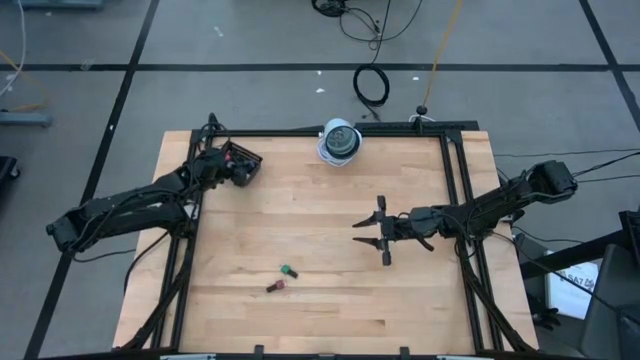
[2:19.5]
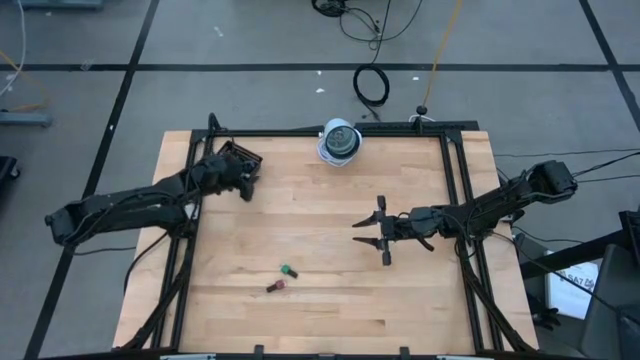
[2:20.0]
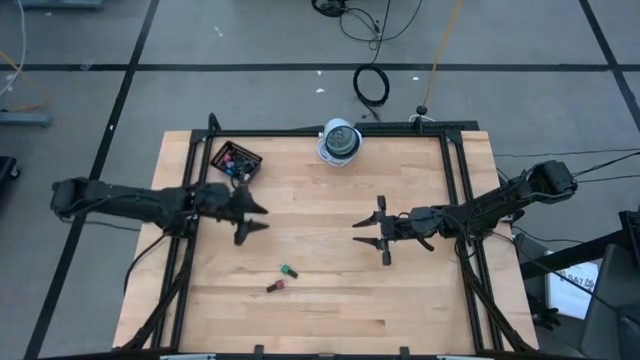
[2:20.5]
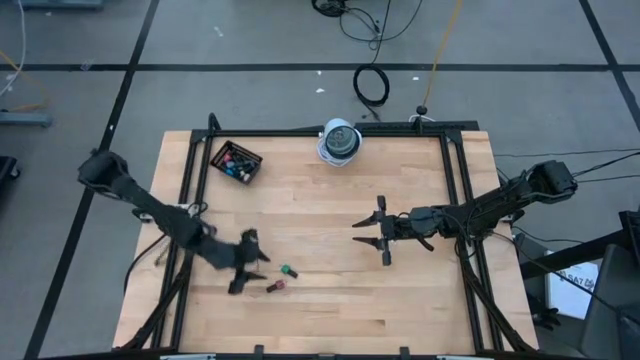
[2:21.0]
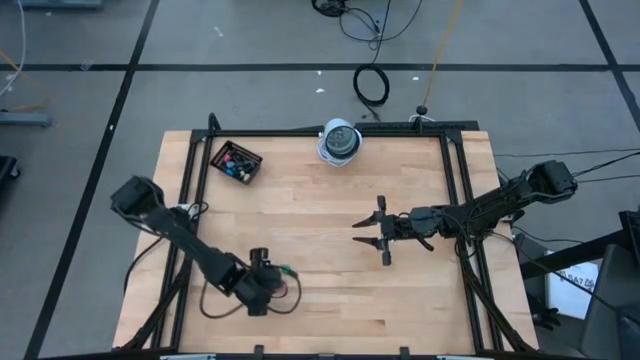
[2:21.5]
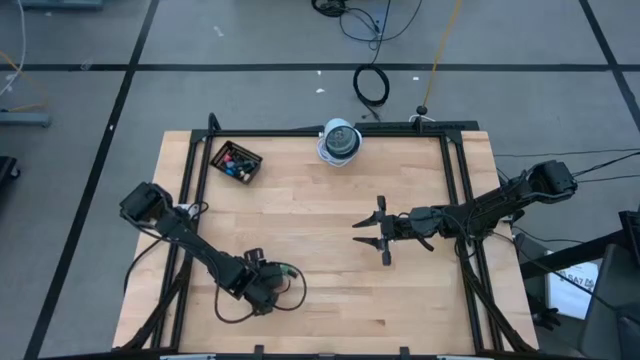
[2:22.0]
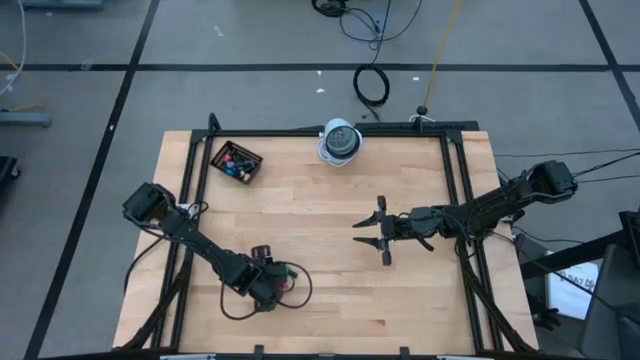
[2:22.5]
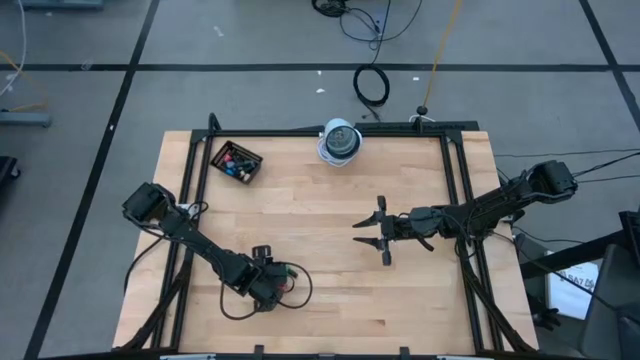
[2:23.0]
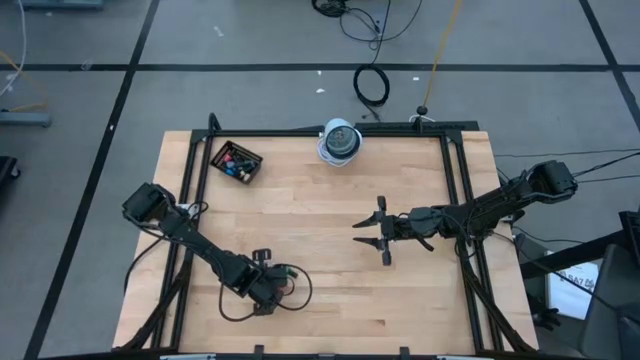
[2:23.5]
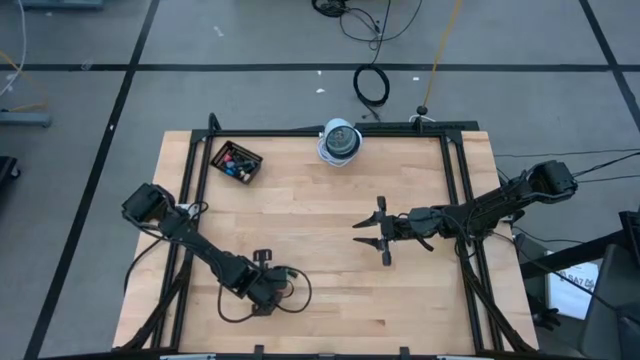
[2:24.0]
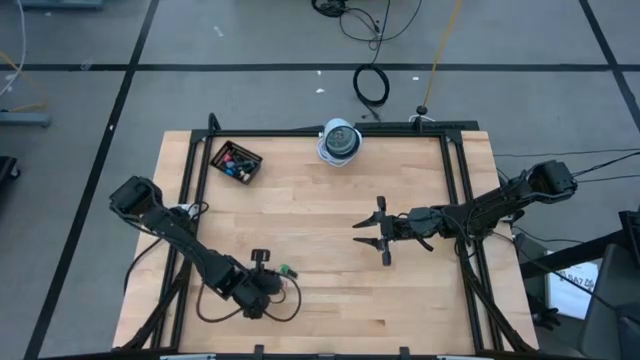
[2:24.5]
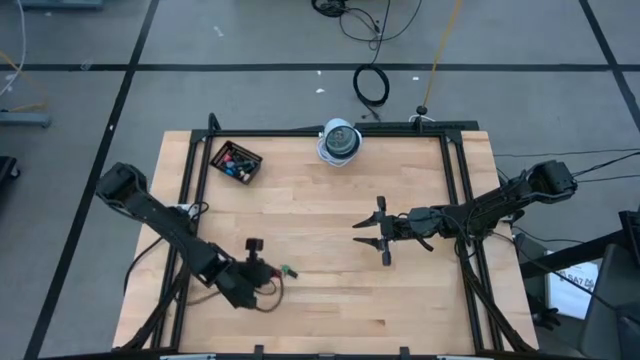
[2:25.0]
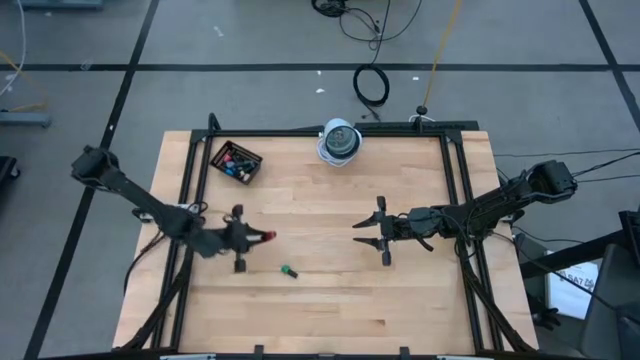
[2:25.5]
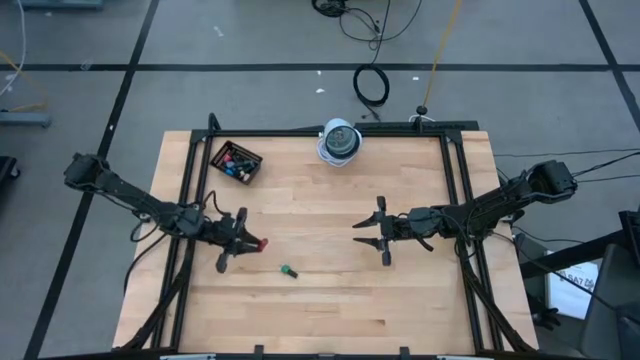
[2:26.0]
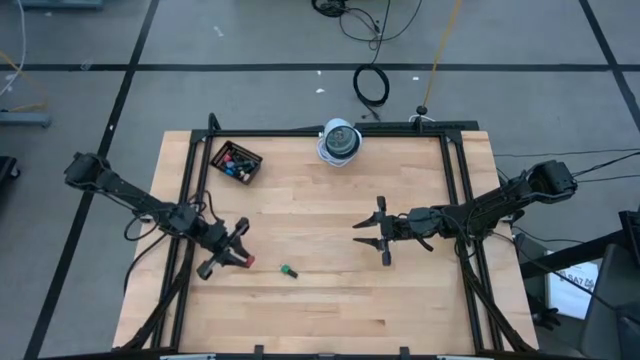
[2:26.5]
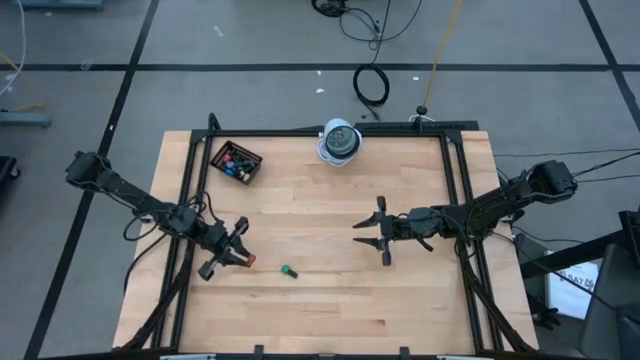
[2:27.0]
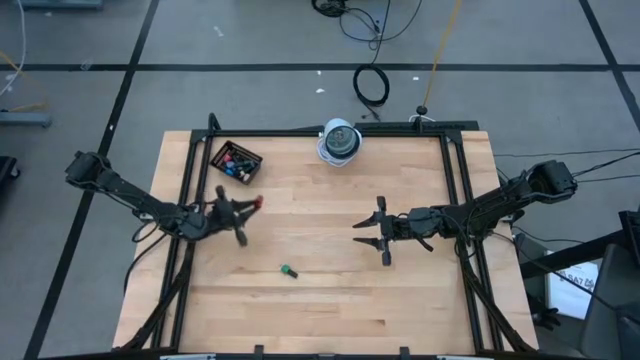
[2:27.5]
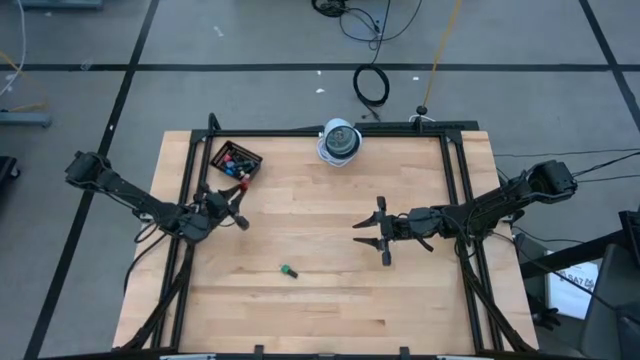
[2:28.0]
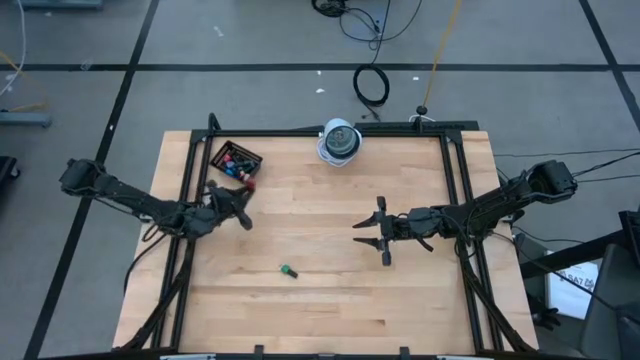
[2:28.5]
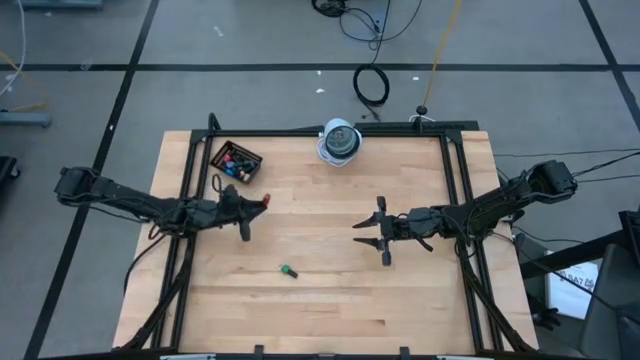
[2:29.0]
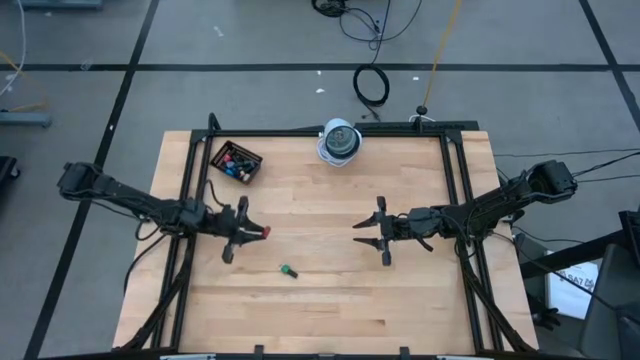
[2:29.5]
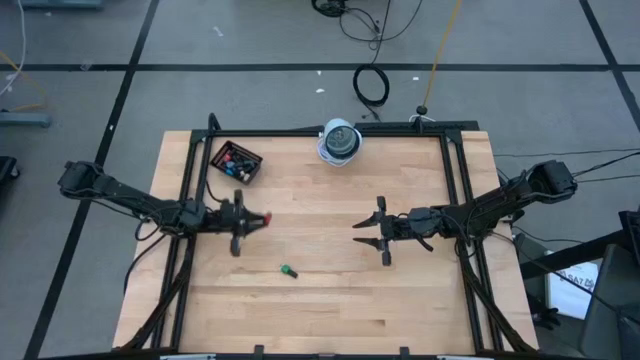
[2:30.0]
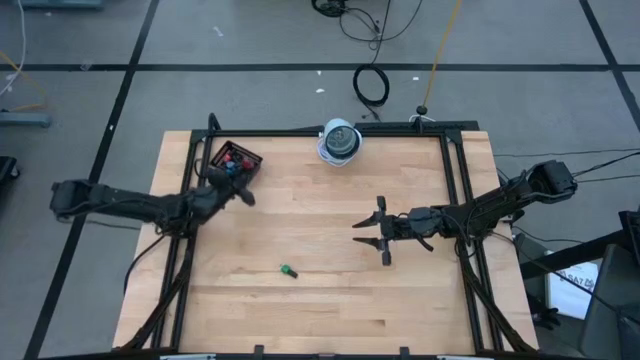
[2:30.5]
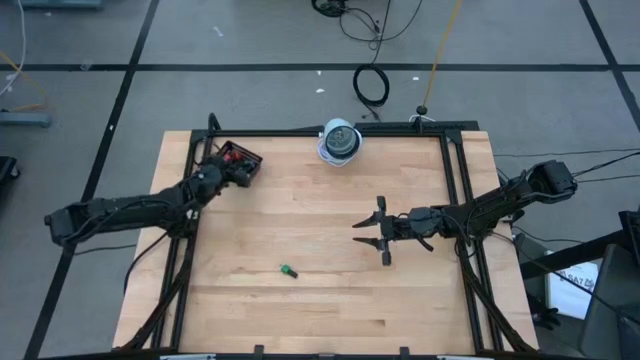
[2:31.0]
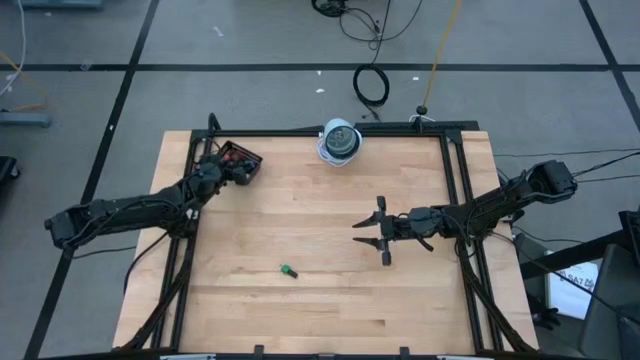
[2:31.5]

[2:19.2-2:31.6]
Task: Pick & Place Nail Polish
Put the red nail polish bottle into the black basket

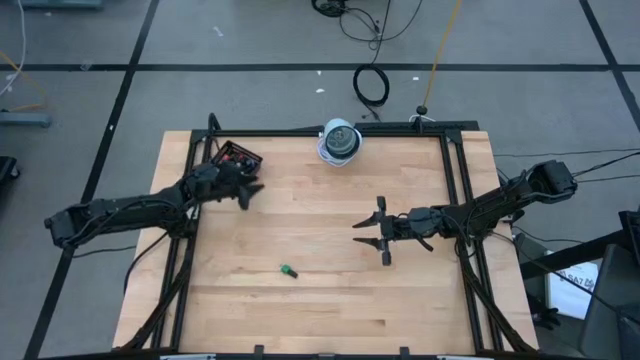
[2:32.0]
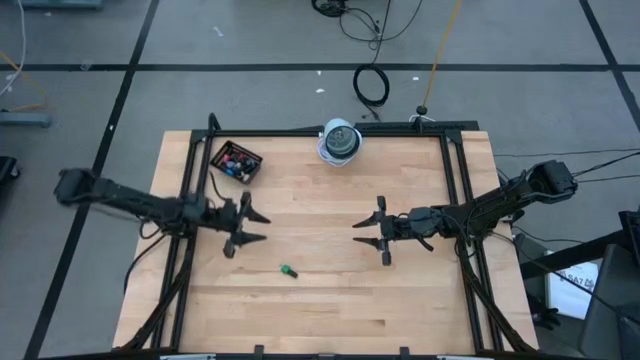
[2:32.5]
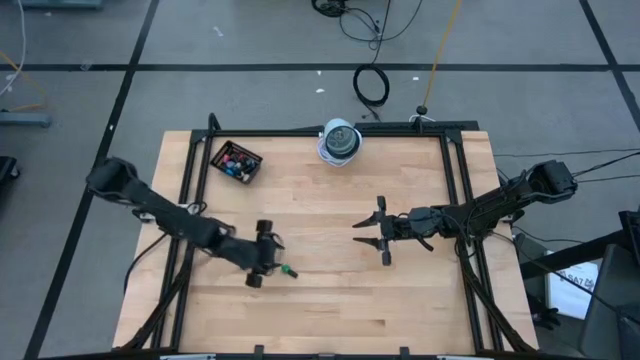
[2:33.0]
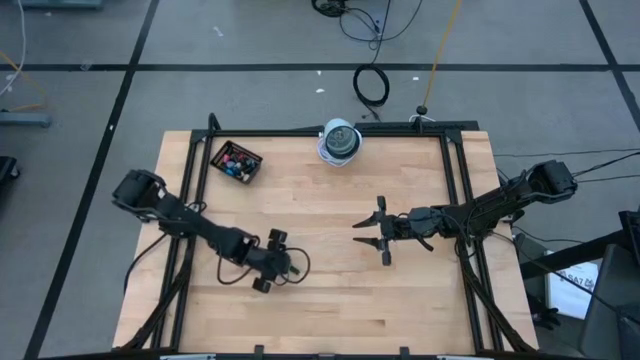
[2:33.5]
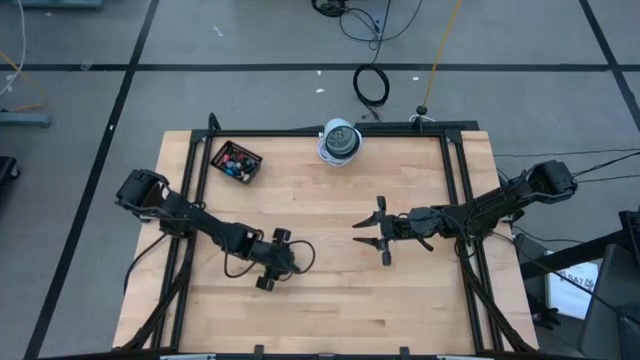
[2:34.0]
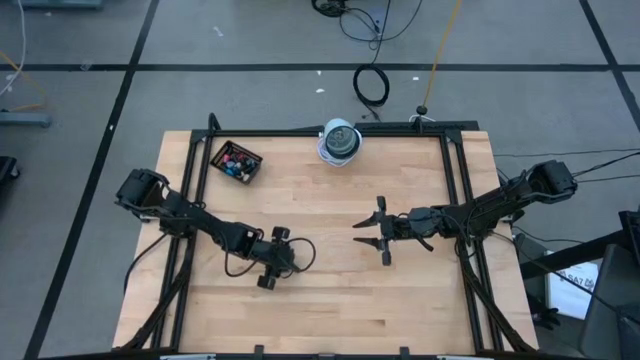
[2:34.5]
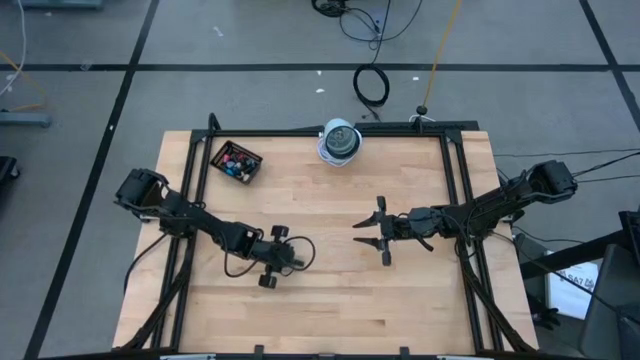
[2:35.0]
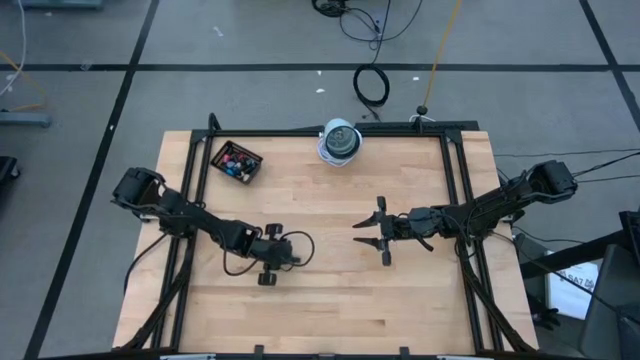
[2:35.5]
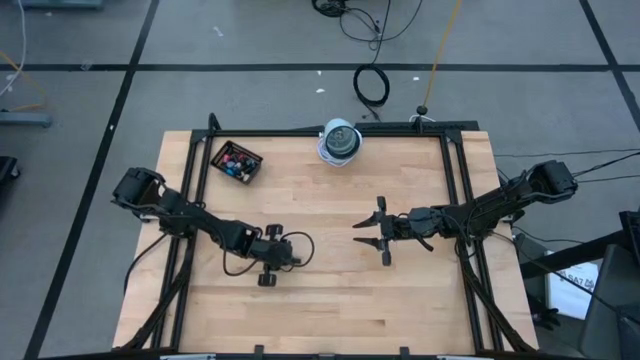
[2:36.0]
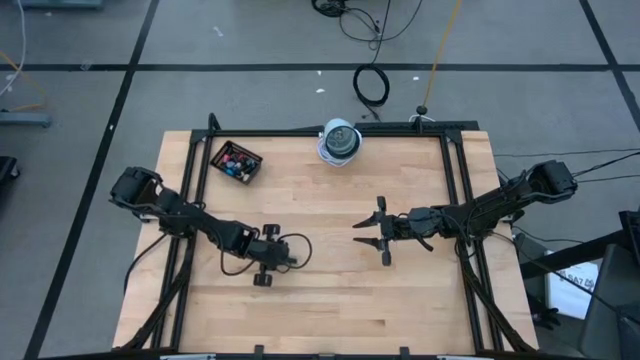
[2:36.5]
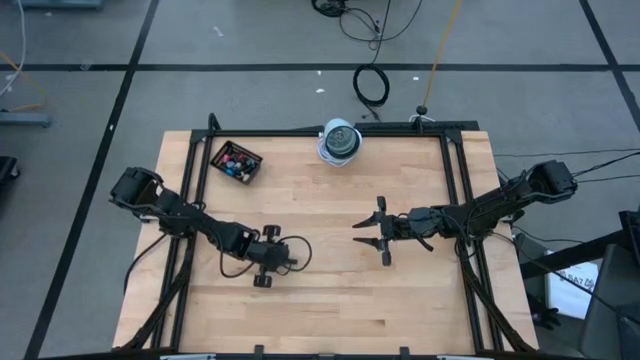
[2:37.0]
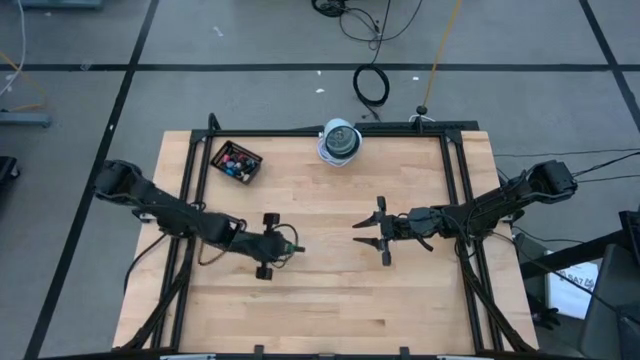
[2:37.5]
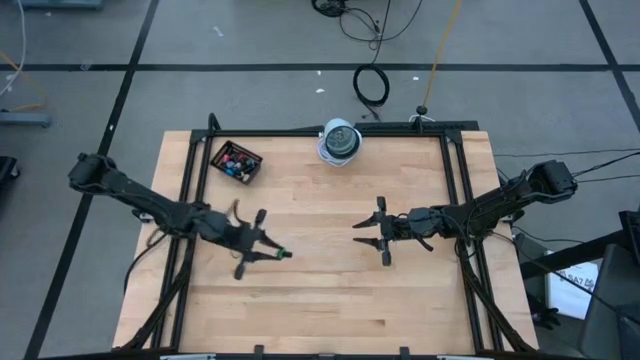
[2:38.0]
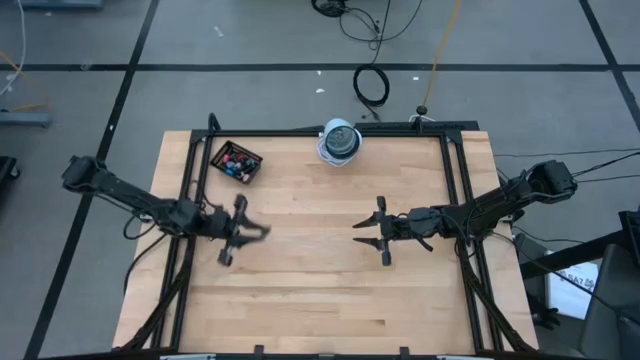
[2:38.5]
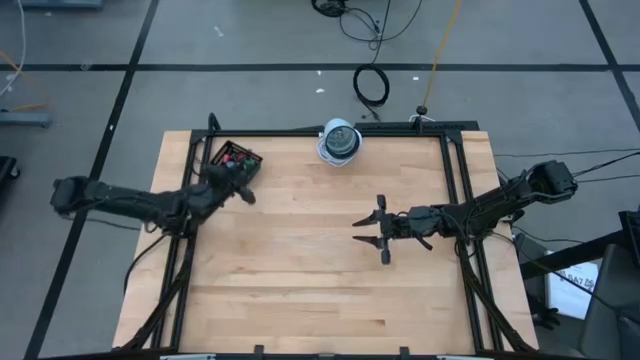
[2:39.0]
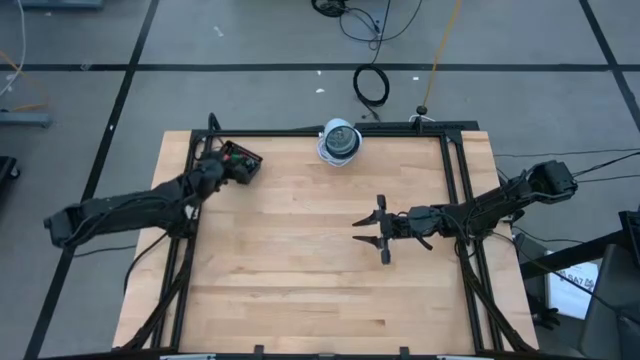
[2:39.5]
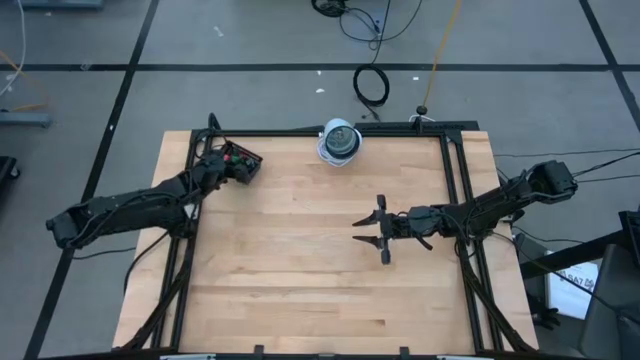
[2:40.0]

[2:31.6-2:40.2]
Put the green nail polish bottle into the black basket

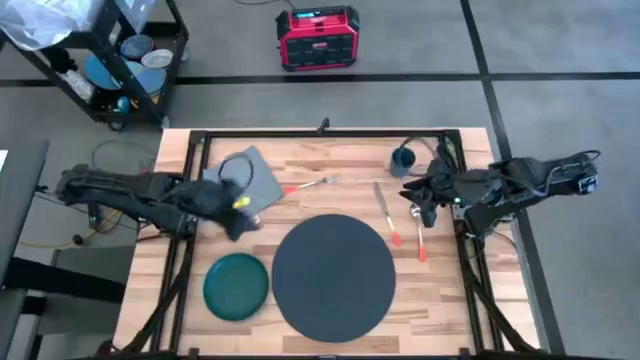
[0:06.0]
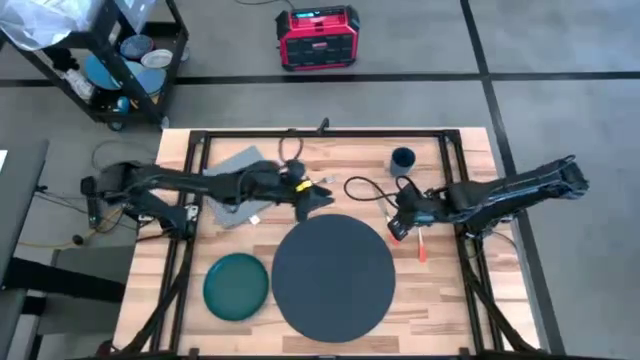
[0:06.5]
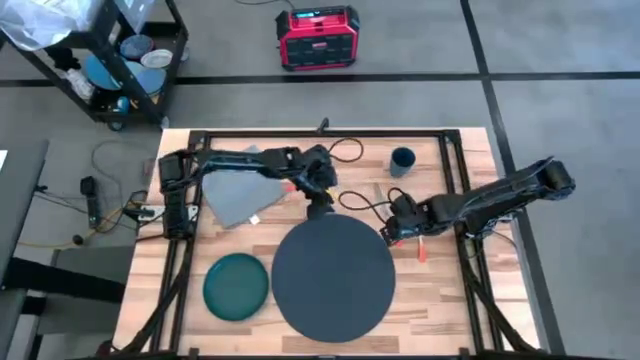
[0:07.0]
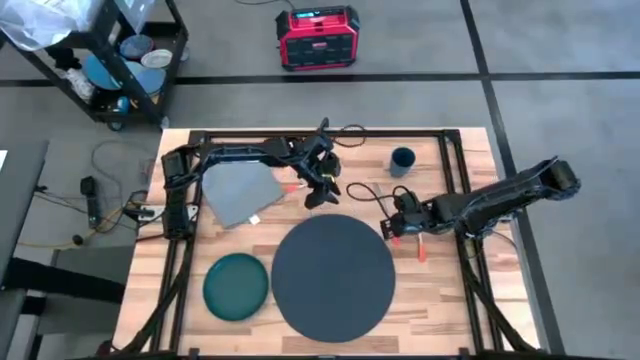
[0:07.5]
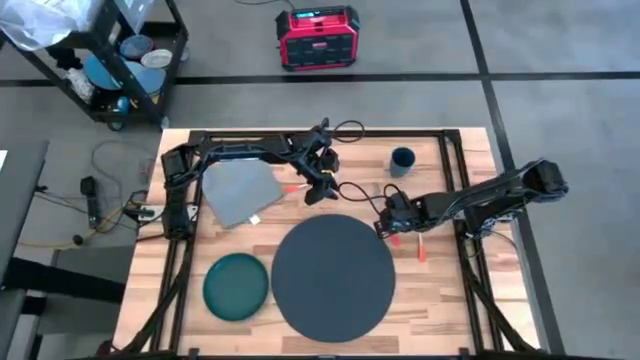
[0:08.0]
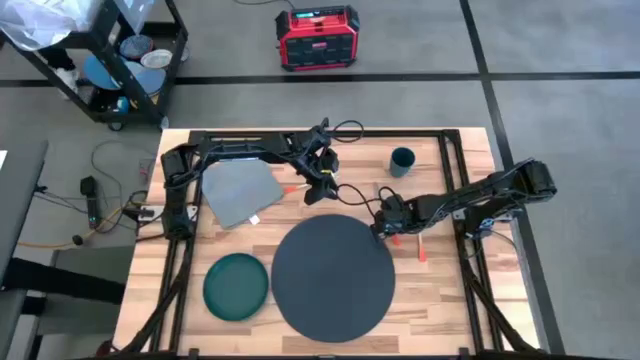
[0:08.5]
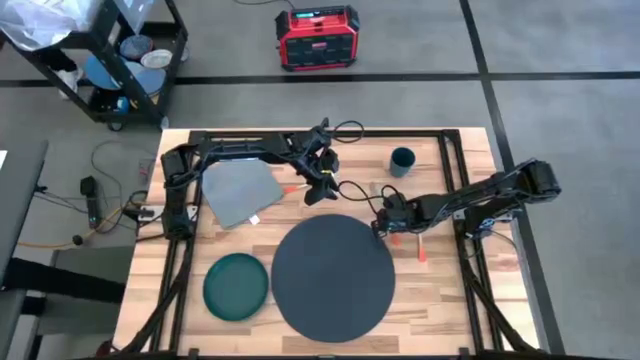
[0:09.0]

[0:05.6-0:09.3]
Task: Set table place
Put the orange table knife on the blue tablemat
